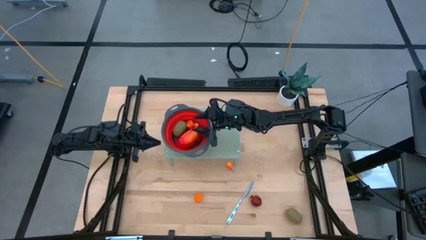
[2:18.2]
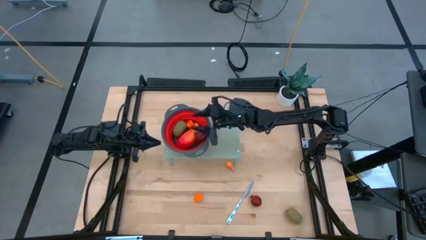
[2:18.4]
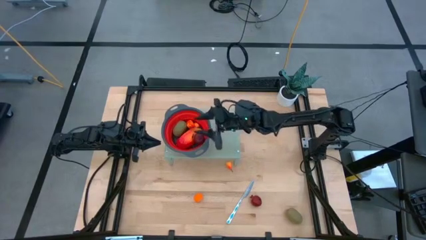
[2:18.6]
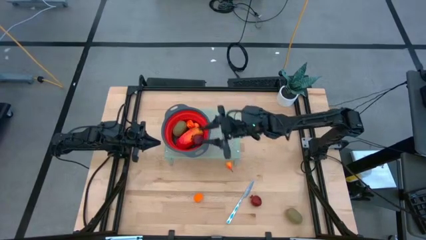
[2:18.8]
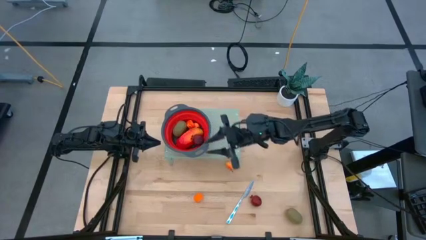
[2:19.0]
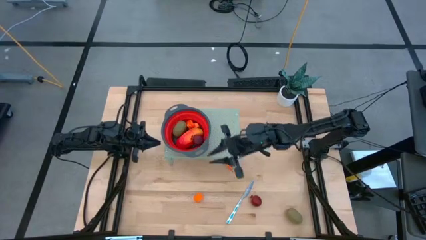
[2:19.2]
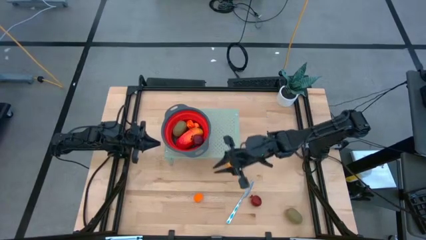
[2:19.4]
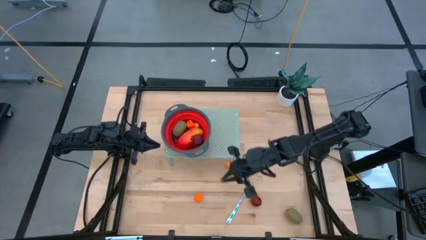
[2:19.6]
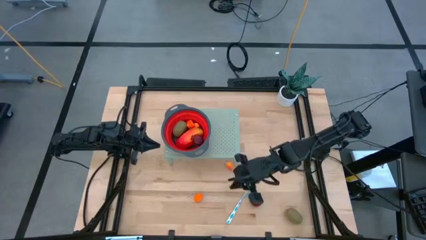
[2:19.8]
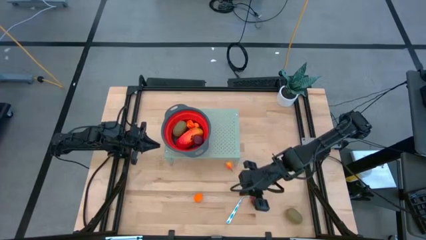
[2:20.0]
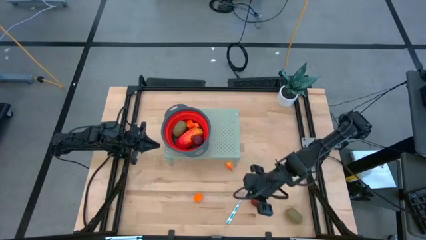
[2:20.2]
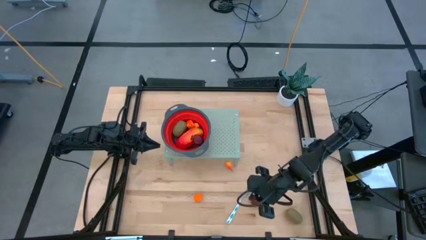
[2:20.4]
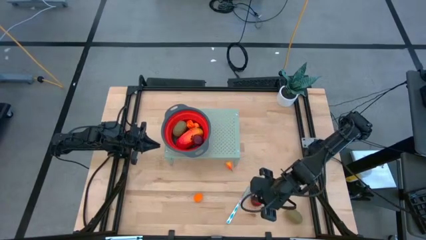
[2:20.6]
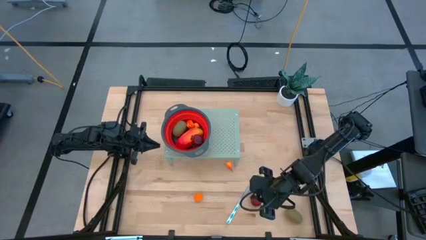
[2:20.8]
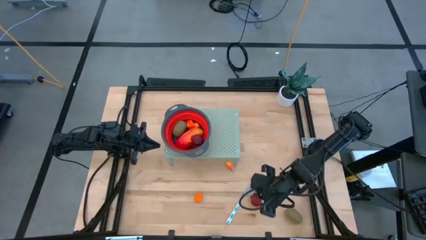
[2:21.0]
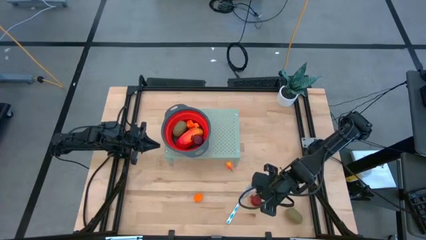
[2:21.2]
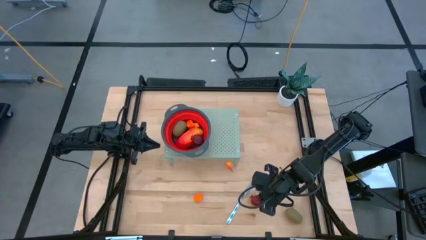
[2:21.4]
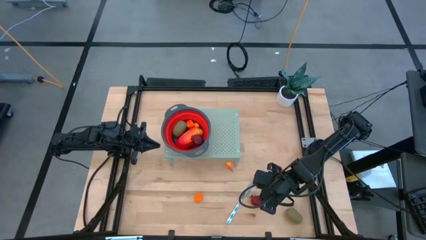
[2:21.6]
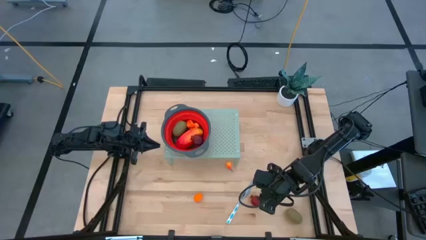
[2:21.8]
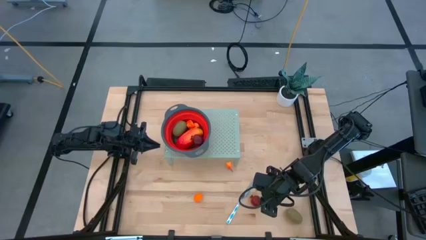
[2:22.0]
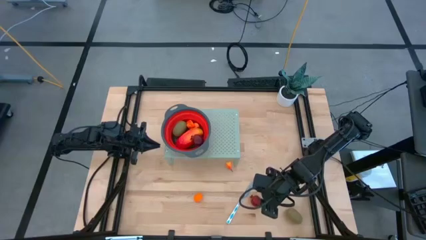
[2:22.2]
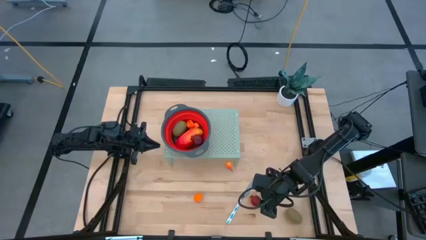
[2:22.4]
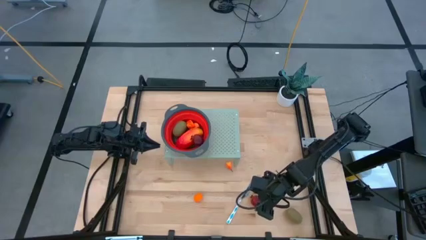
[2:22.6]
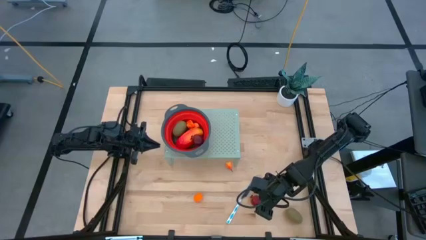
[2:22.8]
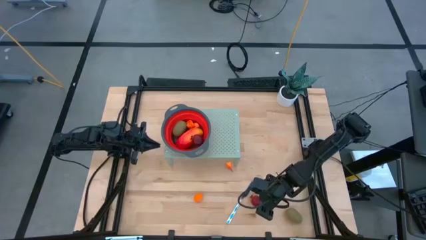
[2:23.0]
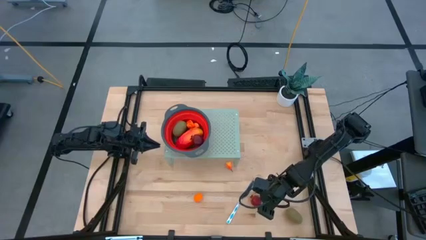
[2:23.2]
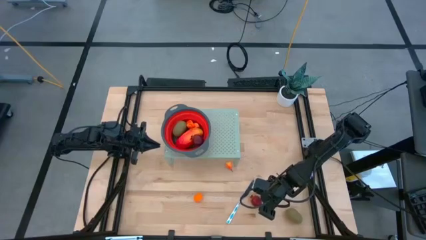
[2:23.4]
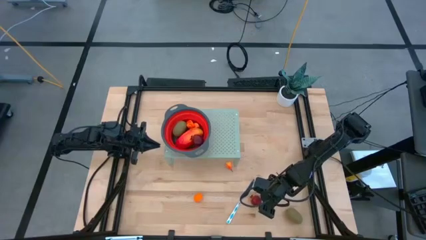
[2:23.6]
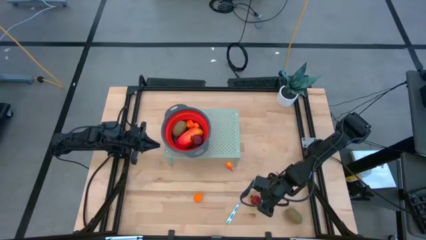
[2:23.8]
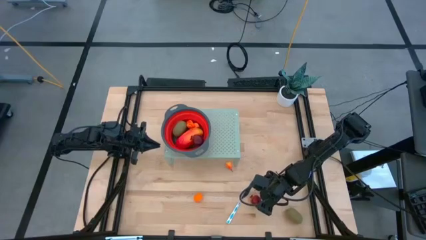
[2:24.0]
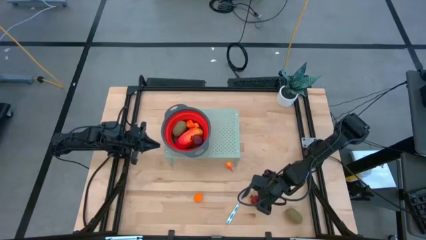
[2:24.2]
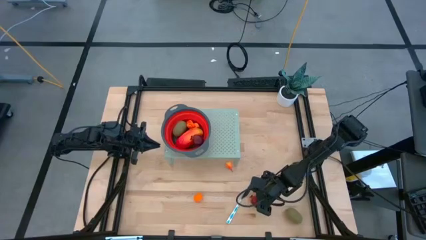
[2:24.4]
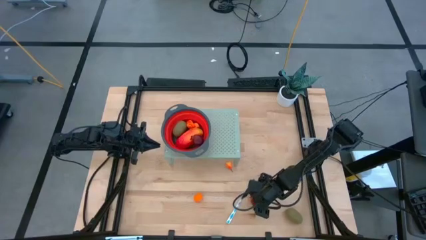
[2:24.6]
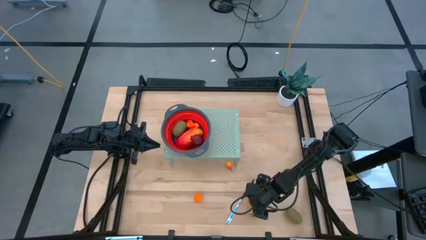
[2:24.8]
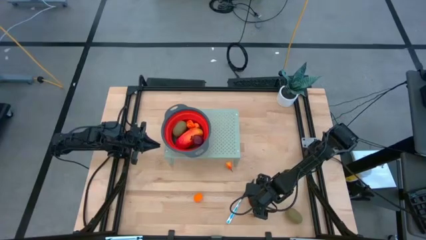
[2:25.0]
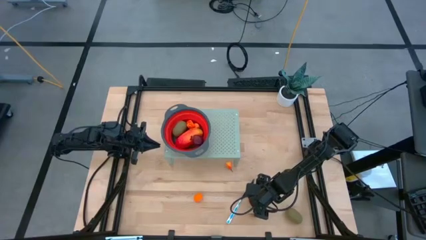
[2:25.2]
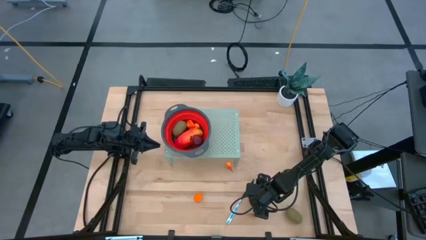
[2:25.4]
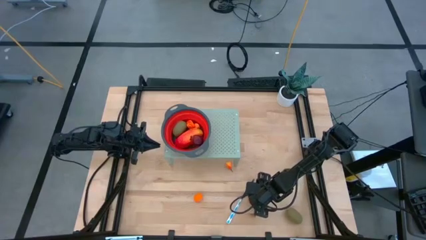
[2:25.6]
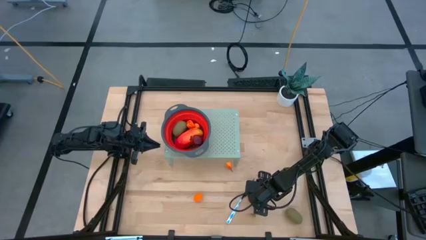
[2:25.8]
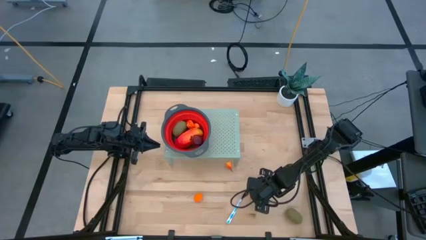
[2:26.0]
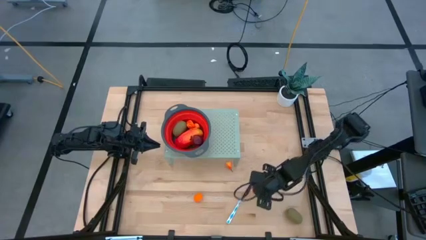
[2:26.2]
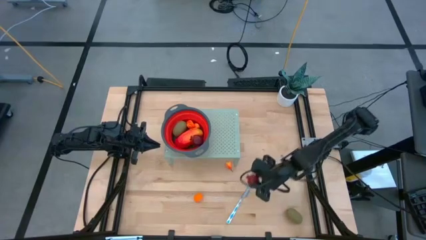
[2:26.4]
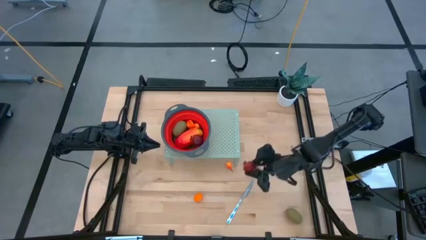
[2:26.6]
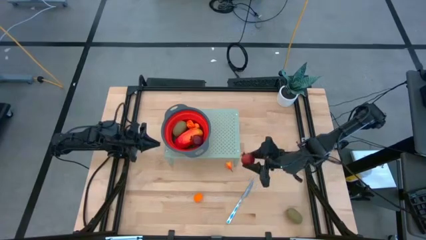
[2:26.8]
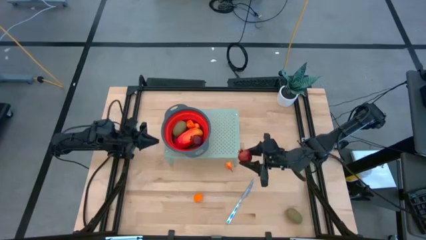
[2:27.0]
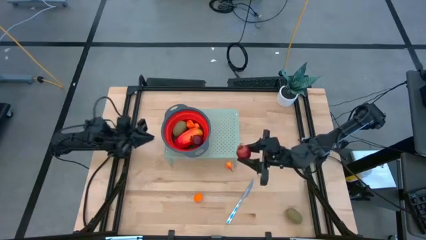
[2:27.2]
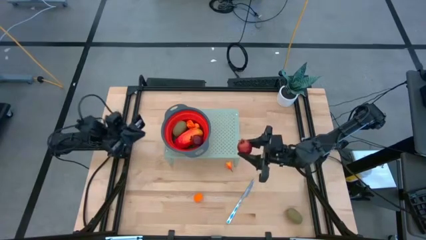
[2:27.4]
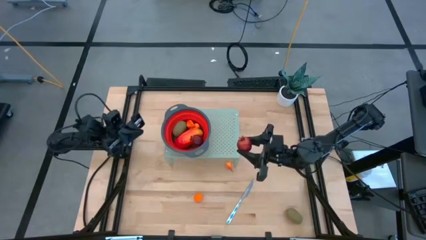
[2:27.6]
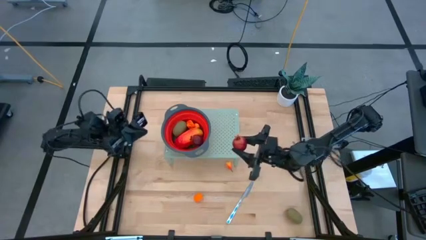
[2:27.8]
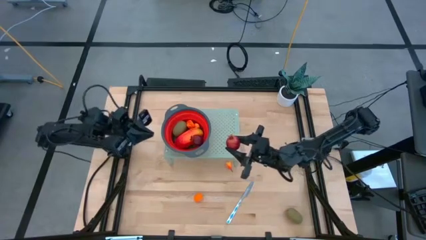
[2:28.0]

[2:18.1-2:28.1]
Task: Pick & Place Fruit
Put the pomegranate into the red strainer bowl on the shelf

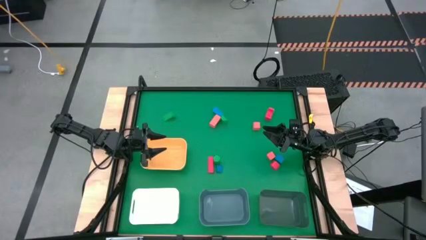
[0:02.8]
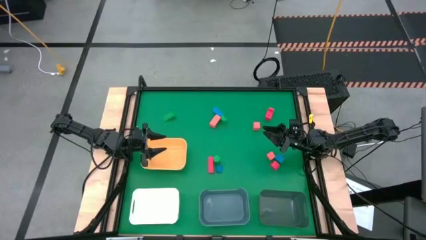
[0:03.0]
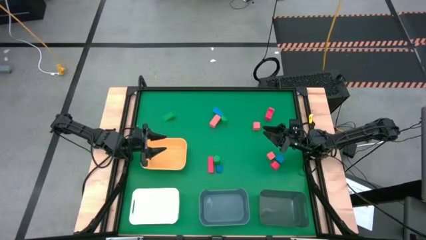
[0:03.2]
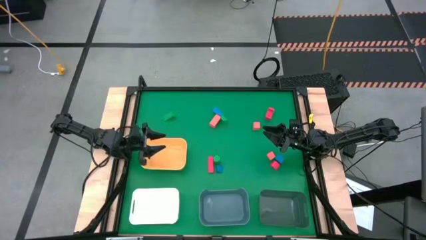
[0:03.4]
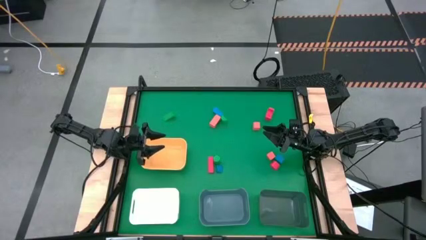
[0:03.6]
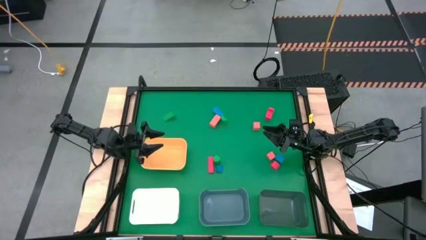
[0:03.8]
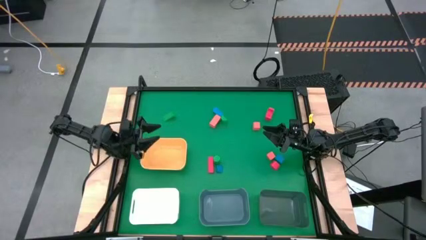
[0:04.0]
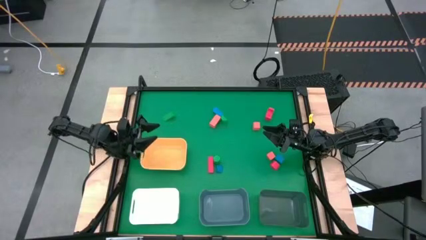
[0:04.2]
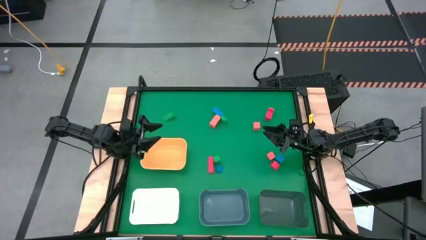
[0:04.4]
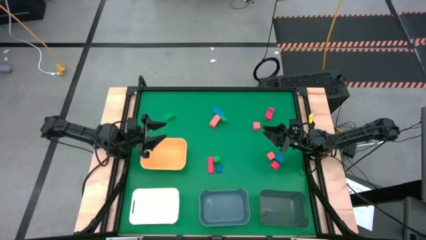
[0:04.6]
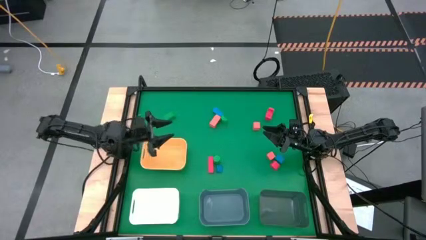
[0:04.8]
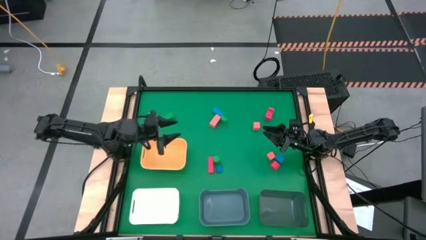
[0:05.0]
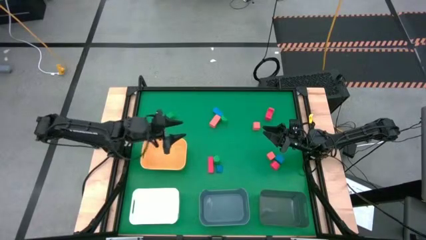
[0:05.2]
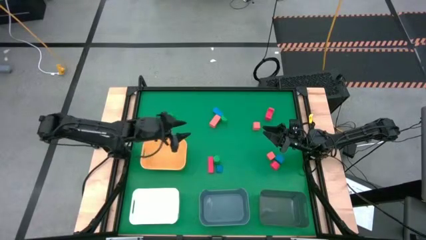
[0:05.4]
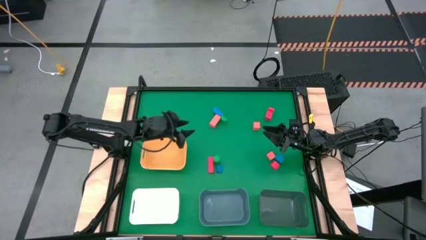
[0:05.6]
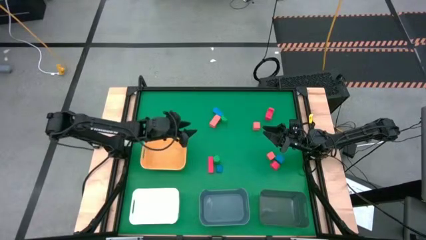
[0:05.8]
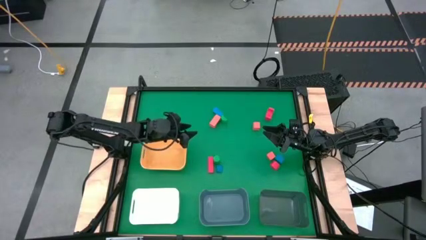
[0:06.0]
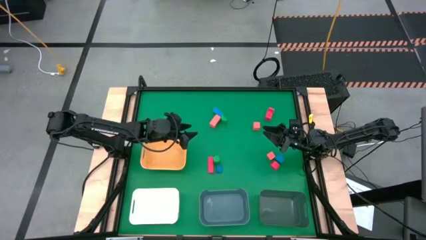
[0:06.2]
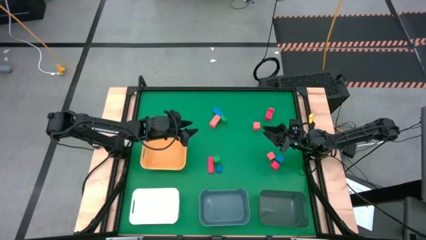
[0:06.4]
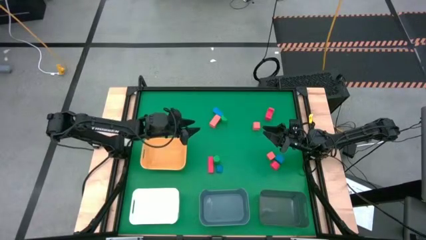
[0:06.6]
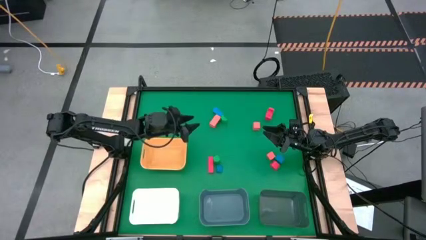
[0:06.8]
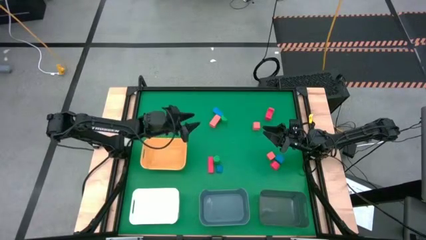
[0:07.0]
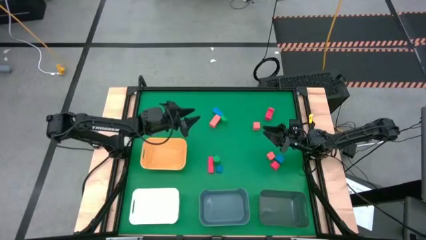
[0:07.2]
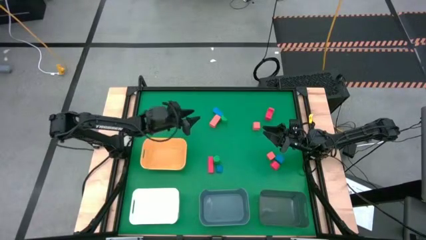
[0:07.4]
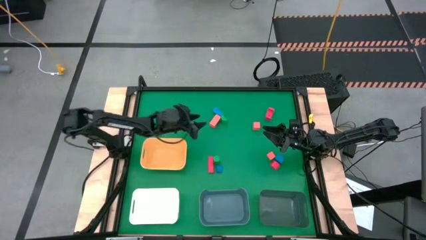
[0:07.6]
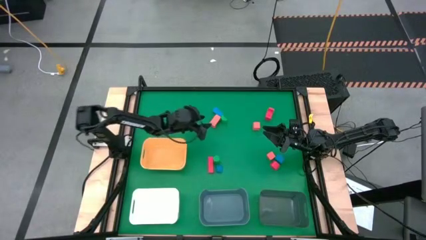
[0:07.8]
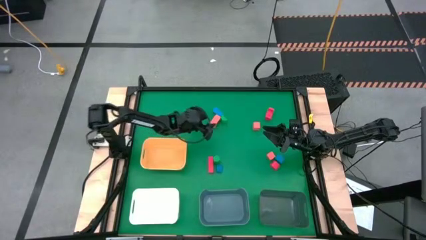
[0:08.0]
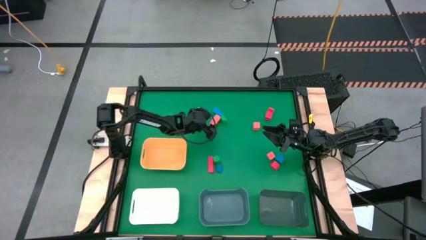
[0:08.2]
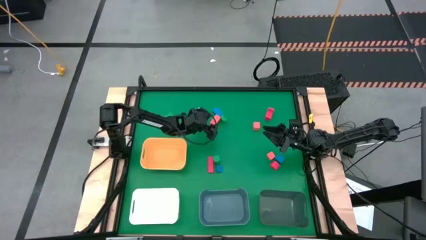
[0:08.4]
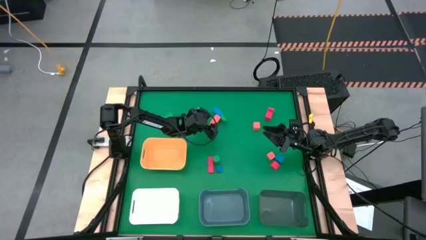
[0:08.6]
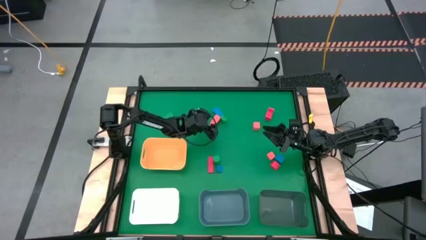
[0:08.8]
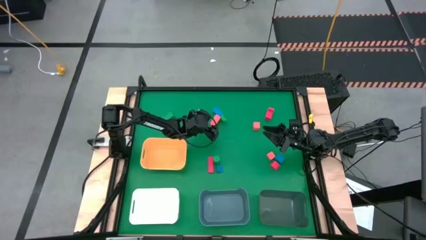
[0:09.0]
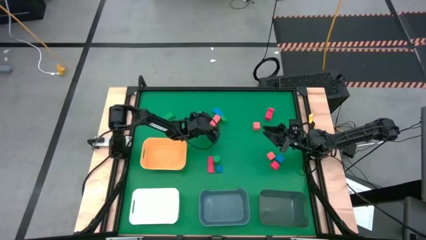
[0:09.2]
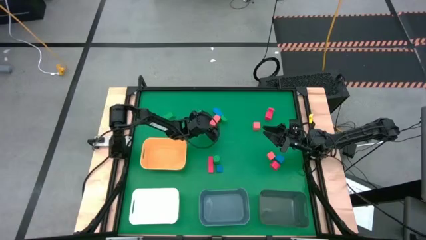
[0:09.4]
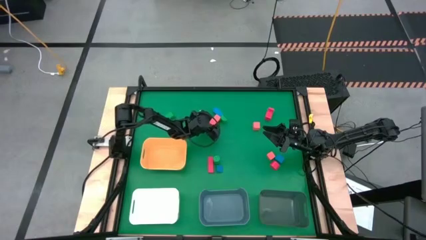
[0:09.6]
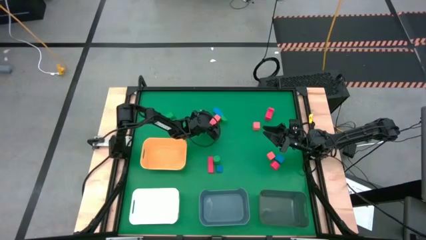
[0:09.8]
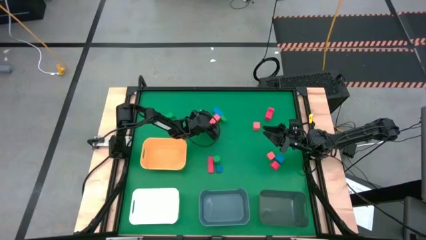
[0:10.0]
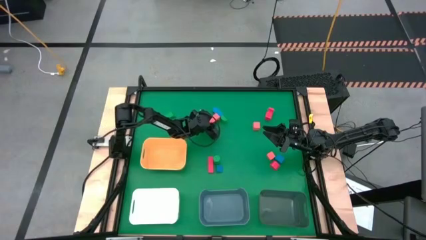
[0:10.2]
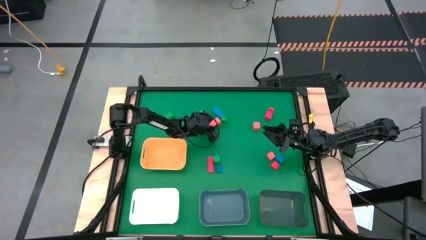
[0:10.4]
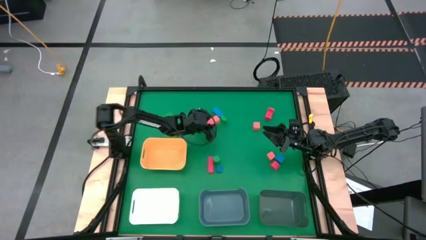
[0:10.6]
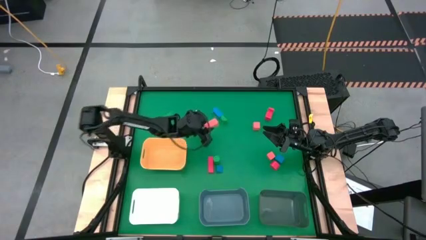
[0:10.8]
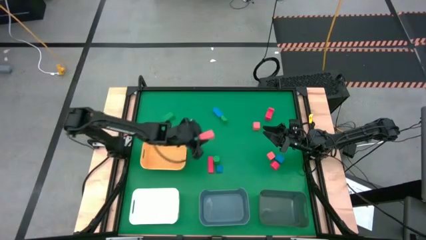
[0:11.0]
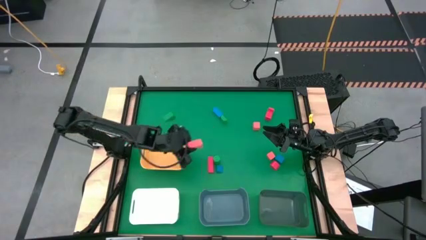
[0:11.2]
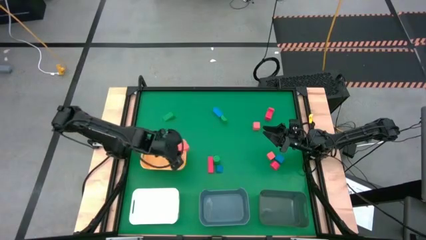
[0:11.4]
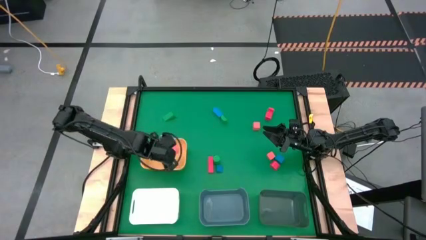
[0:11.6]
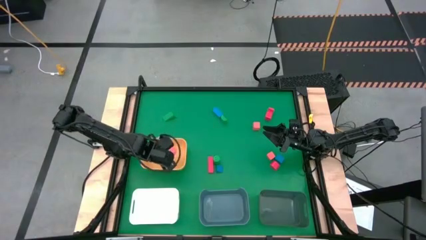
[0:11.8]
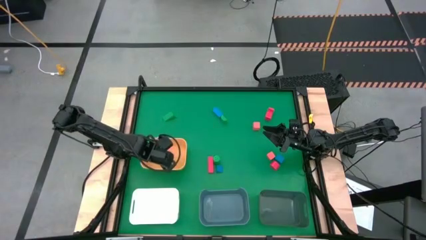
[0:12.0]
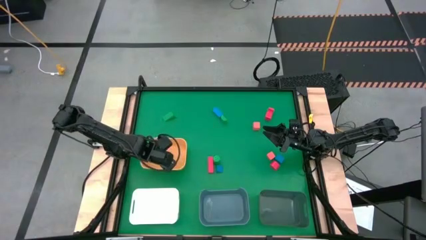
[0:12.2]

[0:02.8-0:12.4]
Task: Sort & place blocks by color
Put the top left orange block into the yellow bin
